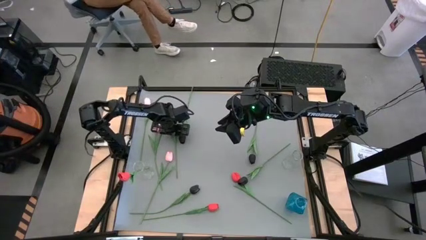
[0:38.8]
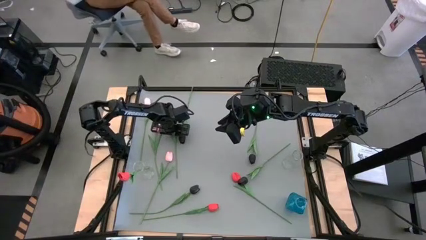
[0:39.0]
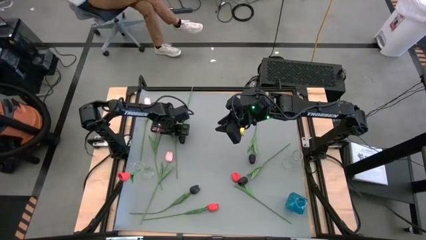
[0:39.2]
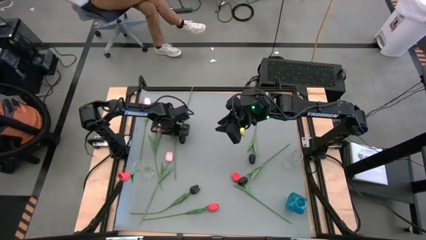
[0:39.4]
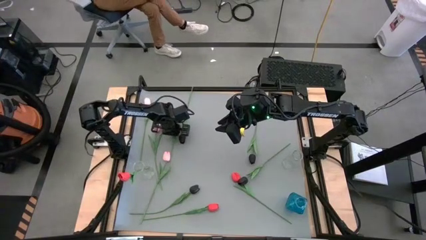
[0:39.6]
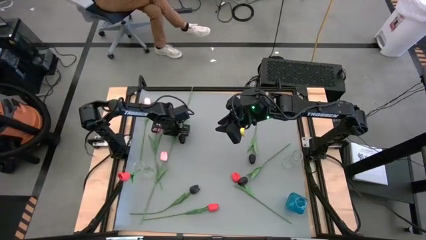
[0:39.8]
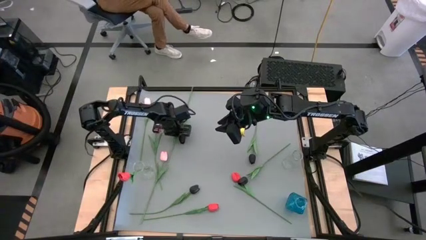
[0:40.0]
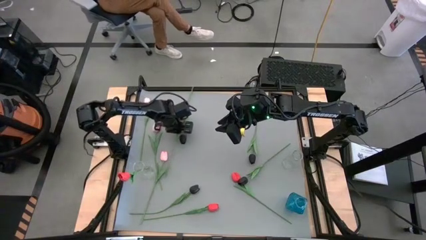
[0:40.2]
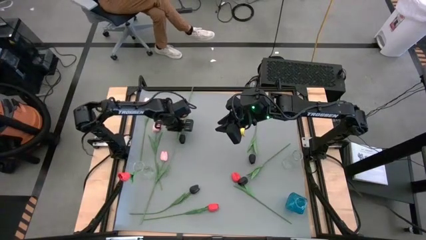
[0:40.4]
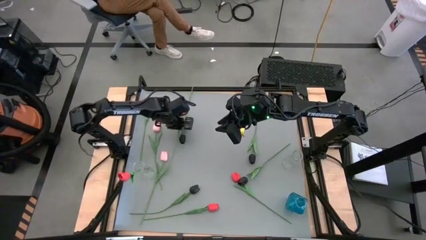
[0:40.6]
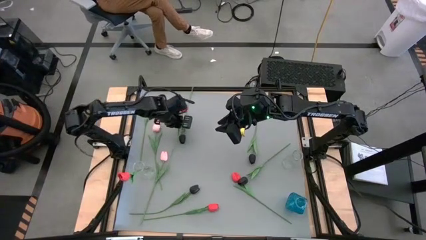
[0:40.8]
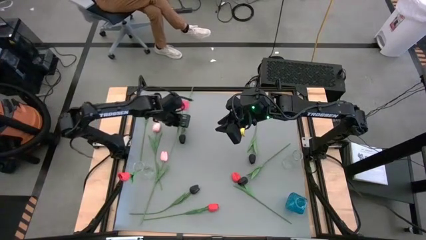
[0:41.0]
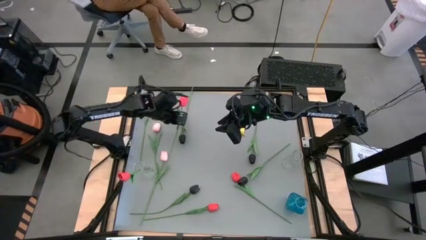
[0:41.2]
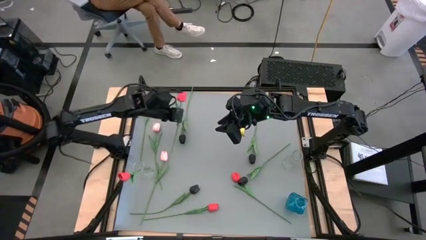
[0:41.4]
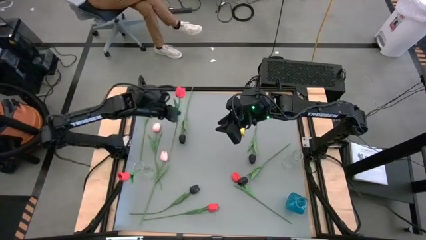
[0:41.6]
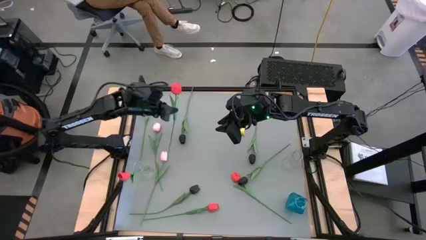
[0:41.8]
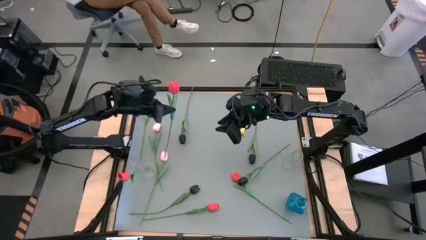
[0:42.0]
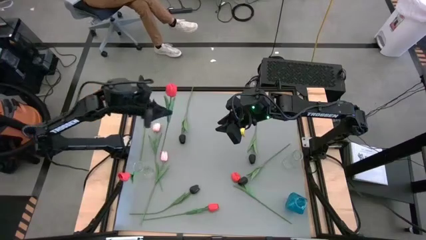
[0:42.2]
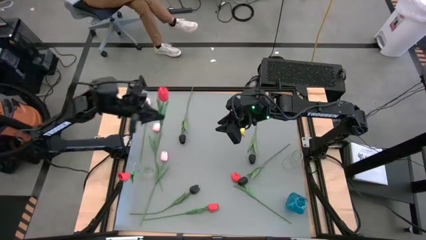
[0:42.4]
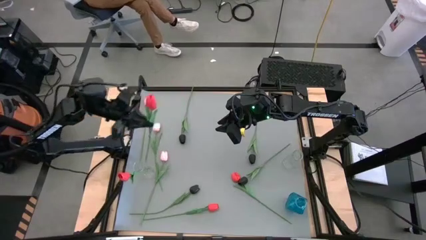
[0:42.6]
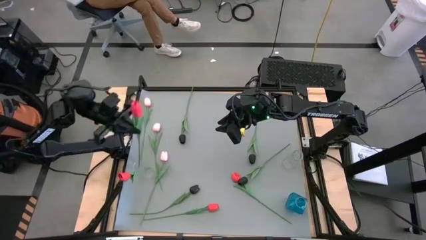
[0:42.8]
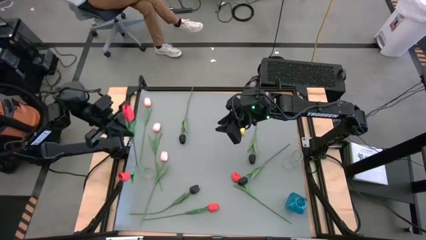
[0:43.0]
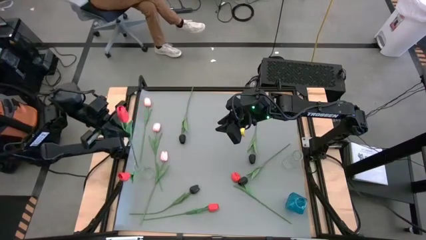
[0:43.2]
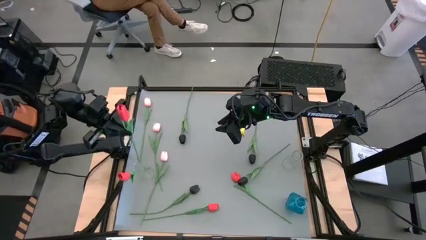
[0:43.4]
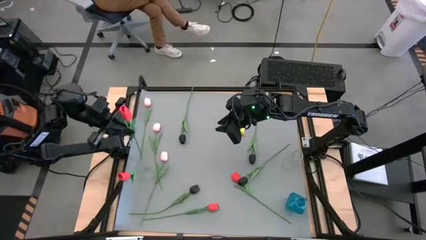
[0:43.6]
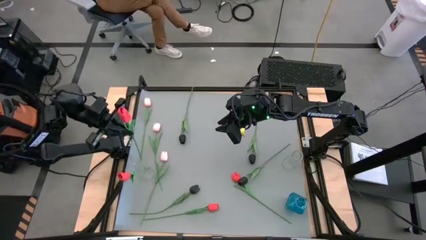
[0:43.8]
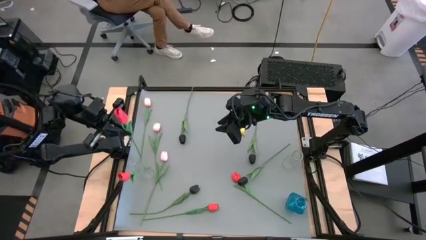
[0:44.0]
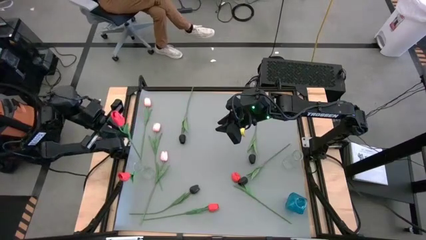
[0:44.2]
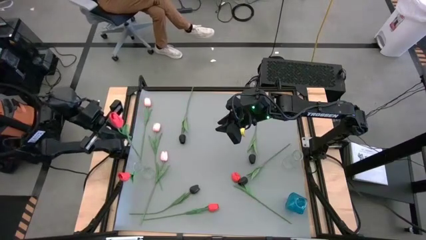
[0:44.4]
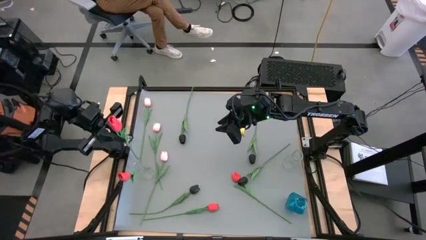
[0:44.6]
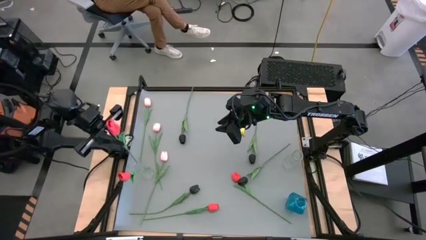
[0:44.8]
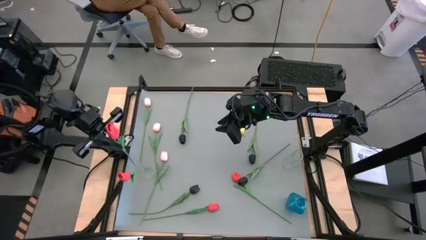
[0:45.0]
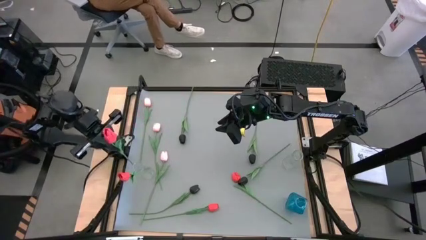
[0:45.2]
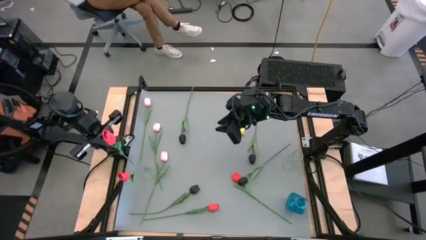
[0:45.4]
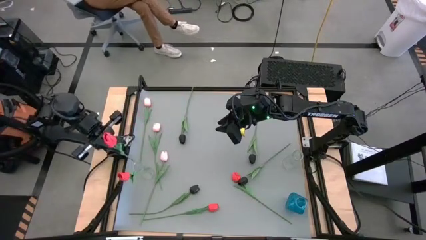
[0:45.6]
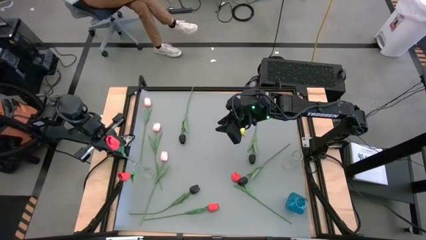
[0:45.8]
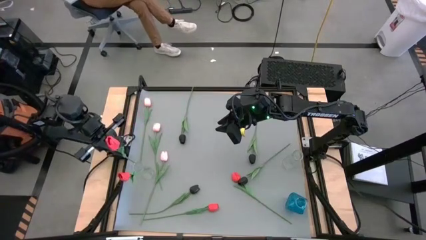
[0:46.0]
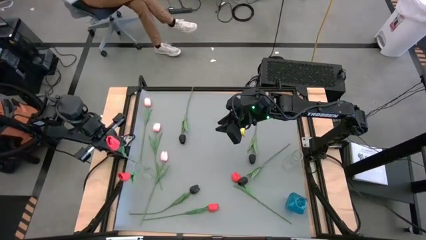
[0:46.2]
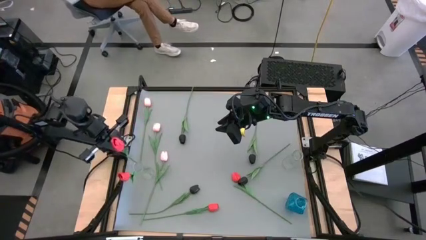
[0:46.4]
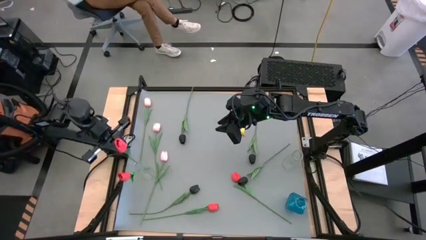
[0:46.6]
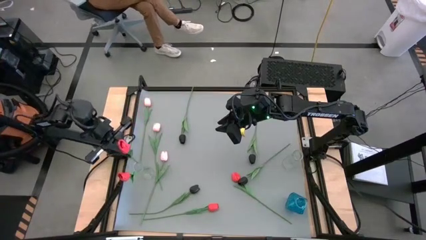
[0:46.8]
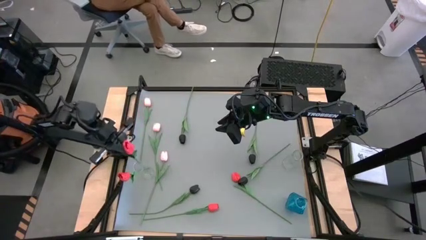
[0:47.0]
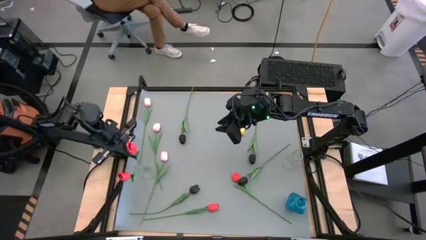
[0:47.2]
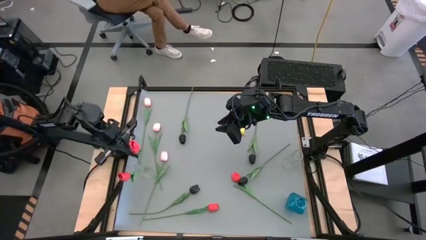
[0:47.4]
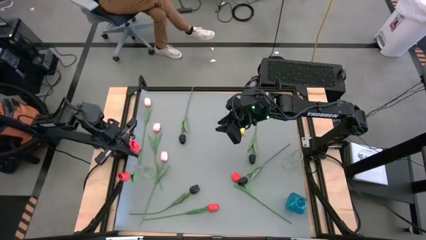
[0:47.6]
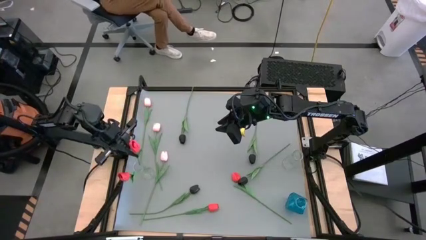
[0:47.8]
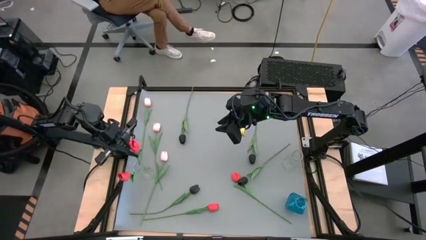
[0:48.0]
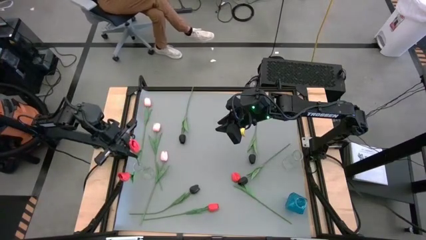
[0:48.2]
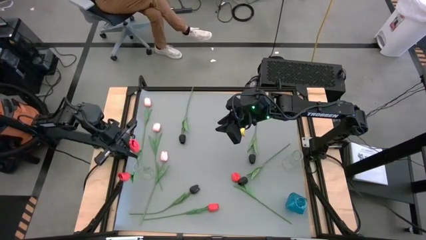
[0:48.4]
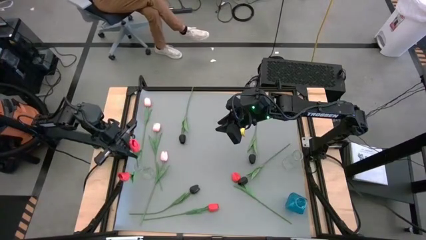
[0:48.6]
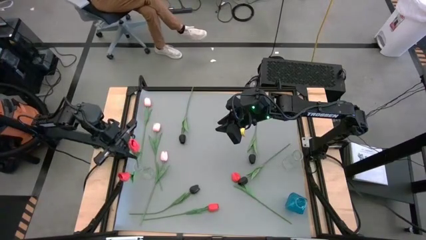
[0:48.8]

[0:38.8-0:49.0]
Task: Sort flowers into vase by color
Put the top red tulip into the left transparent vase
